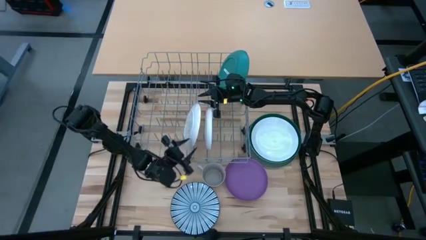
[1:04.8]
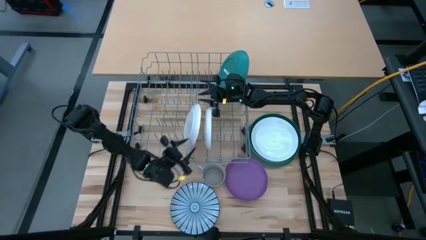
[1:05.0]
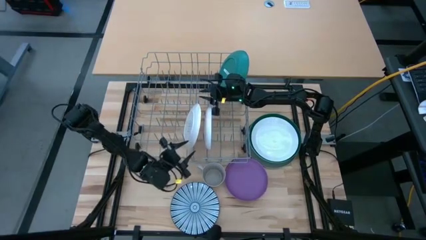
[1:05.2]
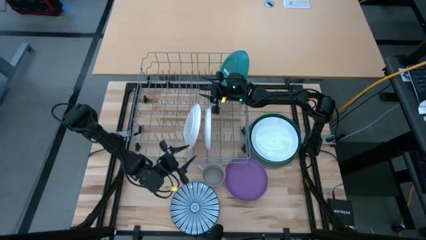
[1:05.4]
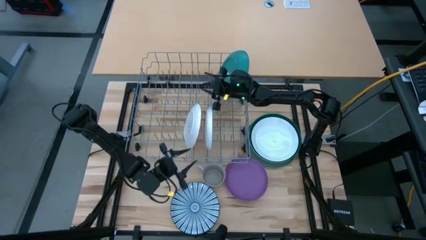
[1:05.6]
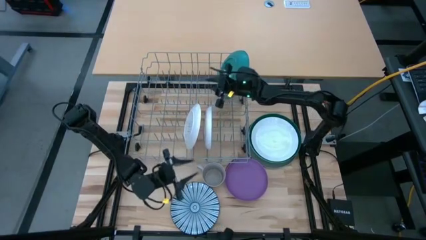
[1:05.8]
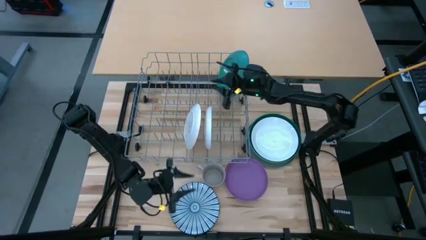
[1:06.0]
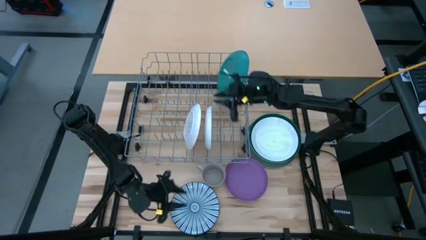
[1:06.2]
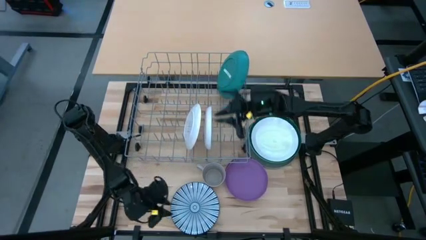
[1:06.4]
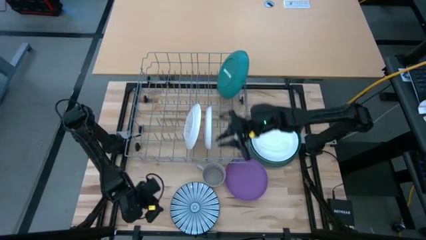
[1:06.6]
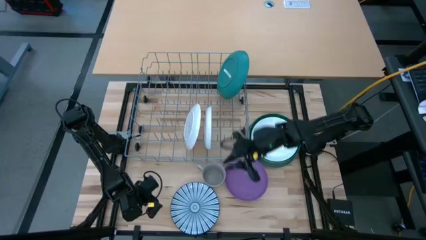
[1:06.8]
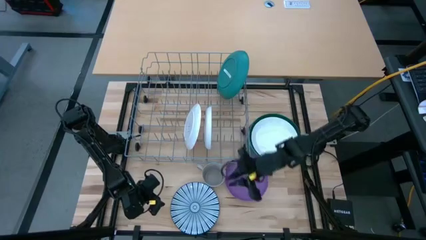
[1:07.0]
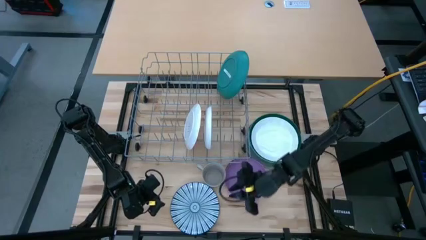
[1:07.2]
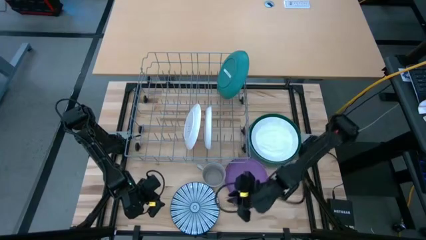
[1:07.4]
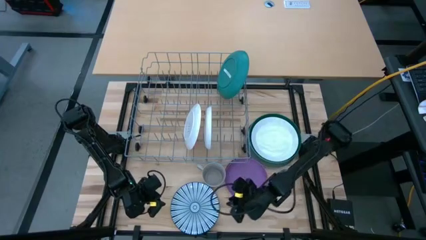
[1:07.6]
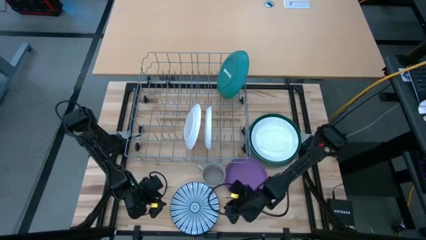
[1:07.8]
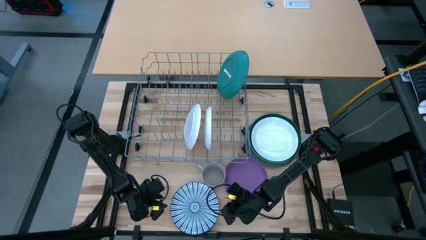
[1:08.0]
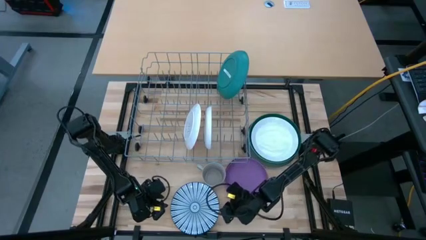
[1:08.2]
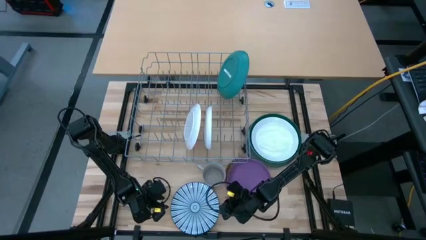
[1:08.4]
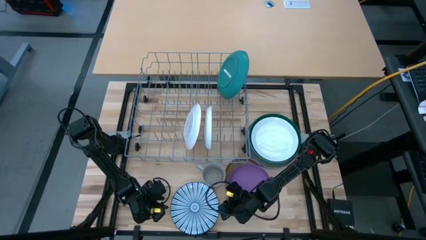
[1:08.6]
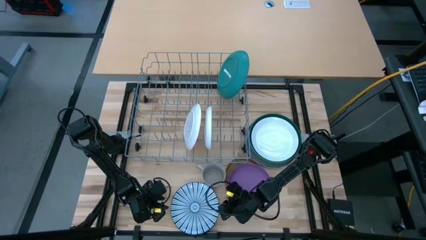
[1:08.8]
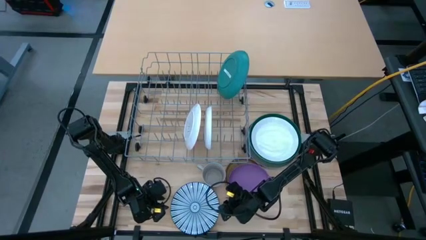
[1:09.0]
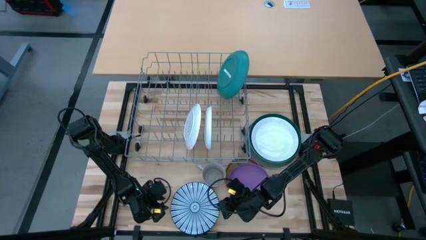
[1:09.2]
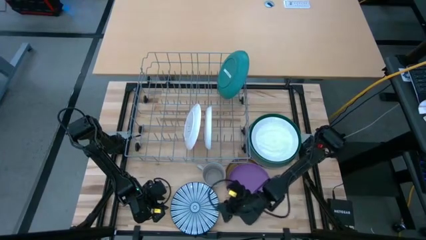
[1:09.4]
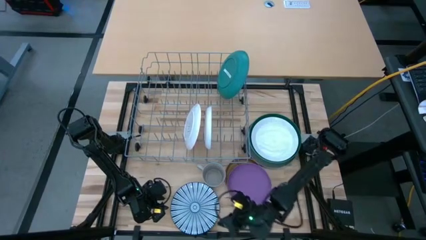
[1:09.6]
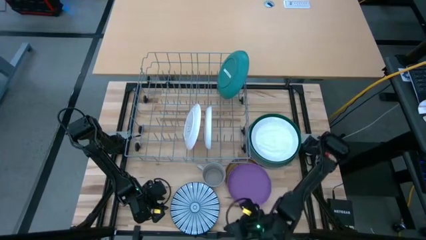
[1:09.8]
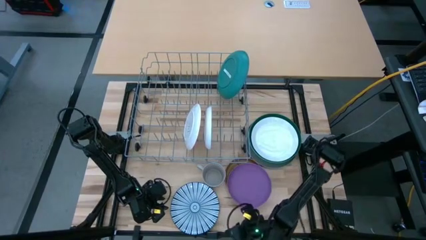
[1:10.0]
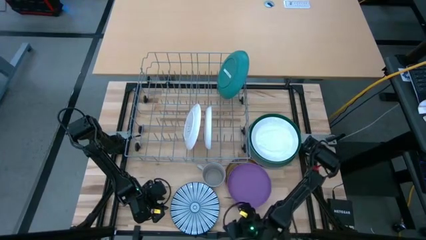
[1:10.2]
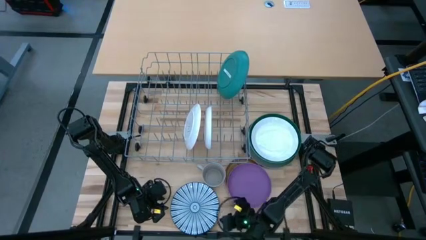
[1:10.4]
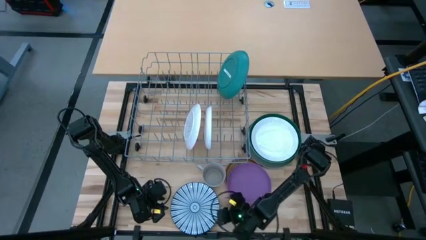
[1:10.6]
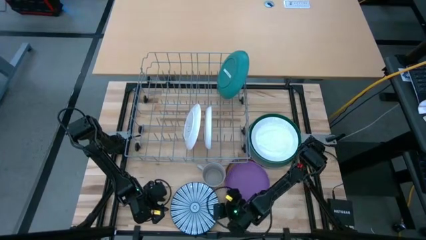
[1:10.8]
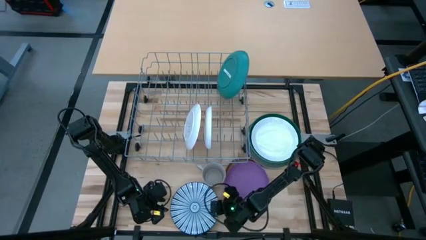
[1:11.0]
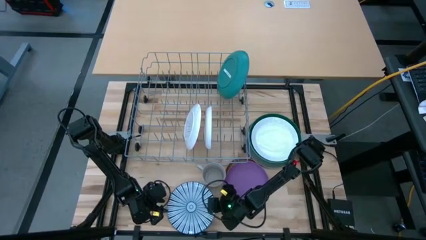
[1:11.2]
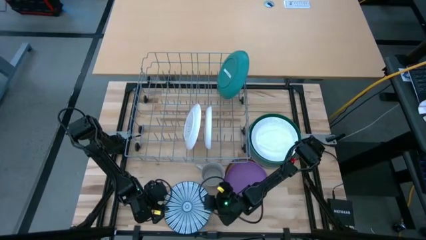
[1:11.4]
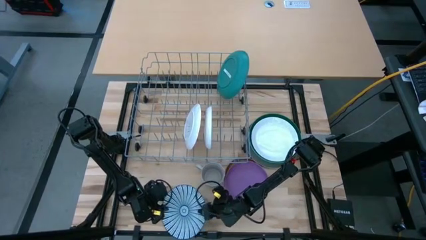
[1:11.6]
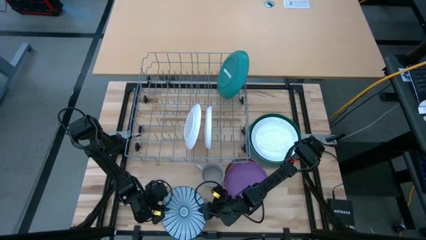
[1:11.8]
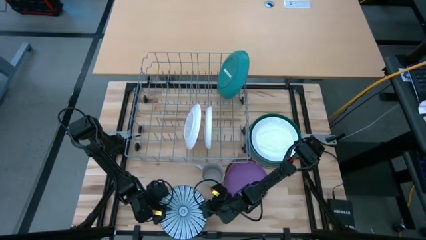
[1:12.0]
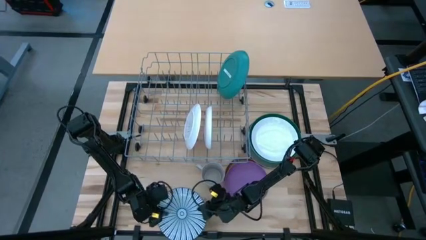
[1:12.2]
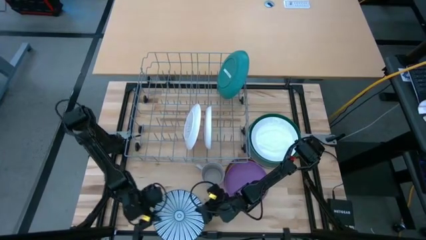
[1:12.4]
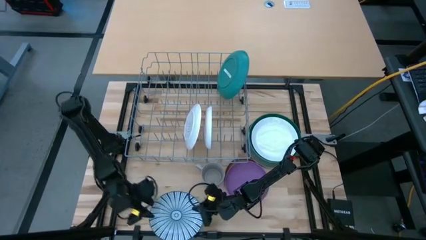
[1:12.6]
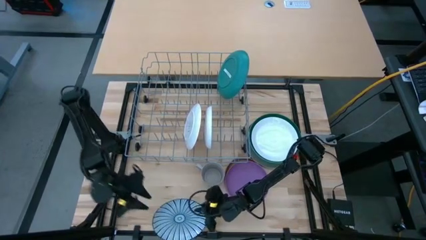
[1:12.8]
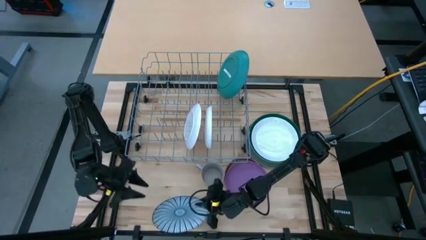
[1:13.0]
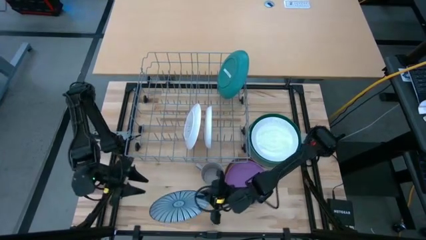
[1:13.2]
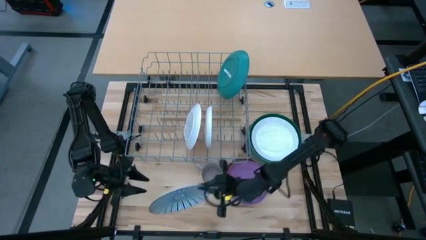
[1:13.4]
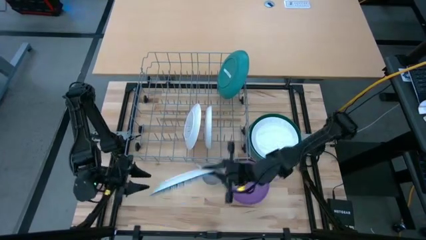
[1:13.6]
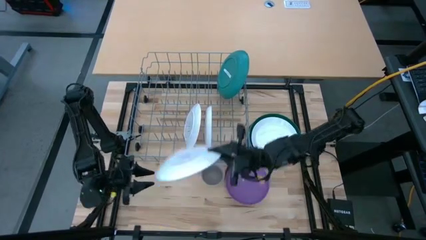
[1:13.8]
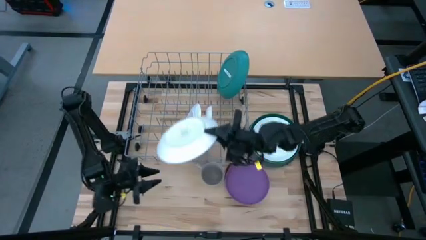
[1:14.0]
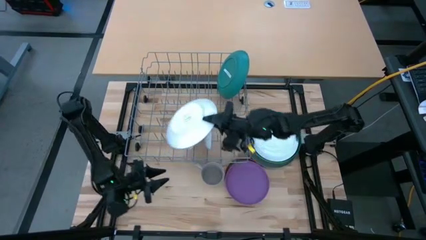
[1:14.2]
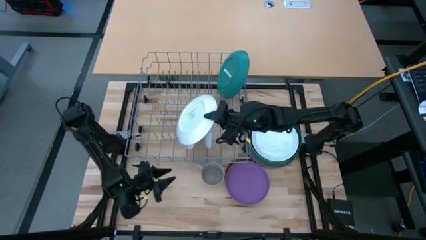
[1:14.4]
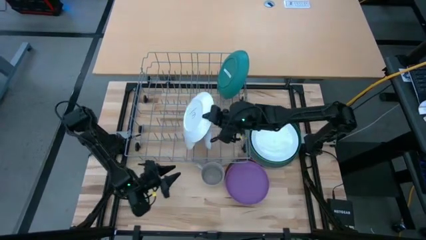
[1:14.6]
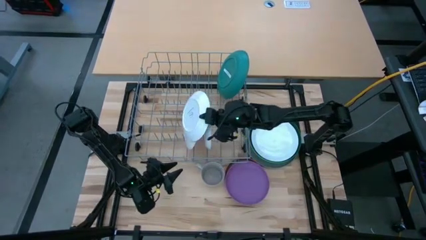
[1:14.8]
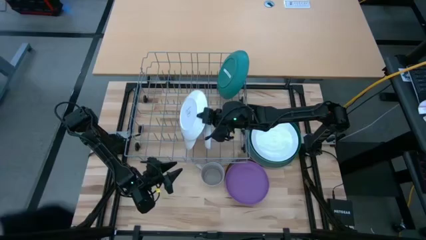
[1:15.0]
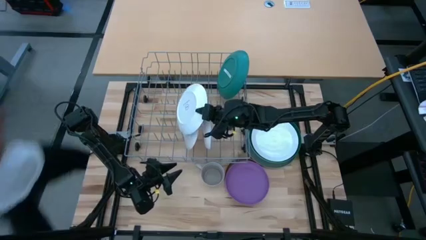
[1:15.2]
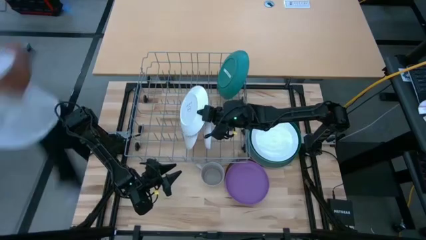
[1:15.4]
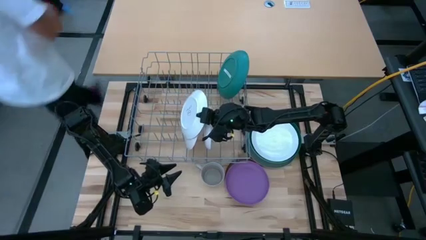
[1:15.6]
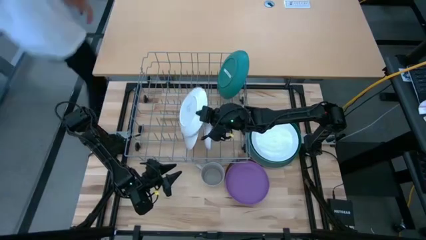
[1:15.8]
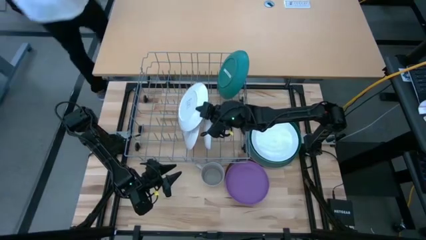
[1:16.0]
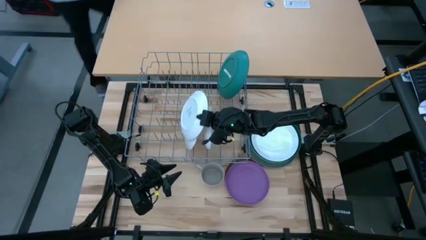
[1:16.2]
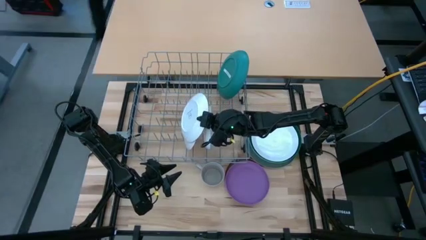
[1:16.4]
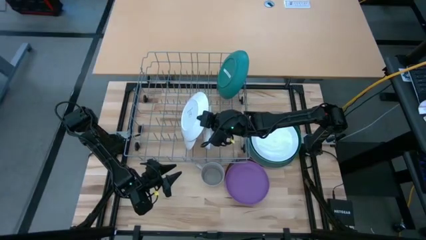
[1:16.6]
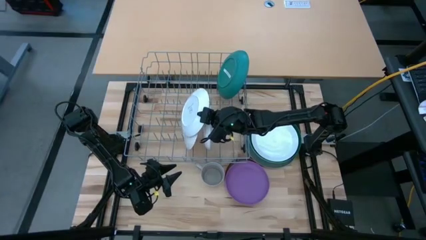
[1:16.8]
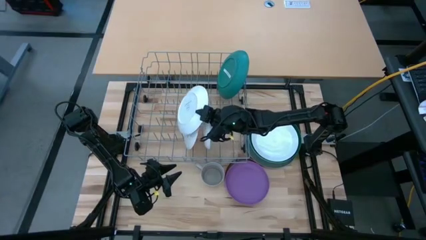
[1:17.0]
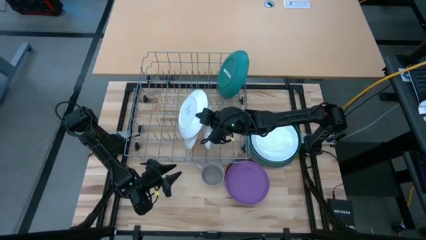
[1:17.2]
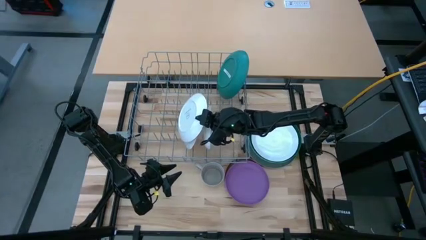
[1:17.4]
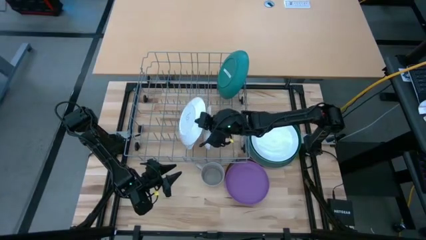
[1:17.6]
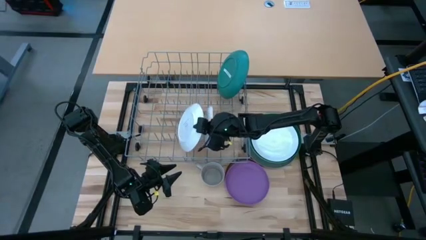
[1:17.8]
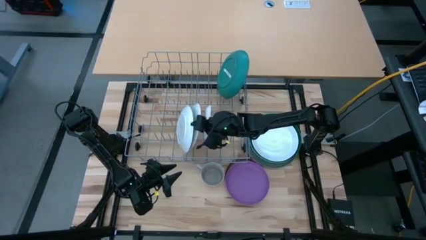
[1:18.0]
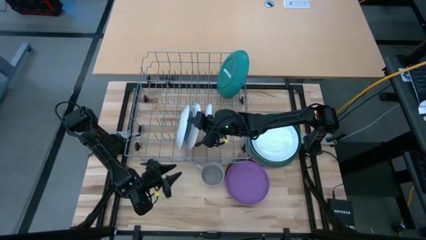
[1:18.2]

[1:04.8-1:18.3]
Task: Sort dishes
Put the blue patterned plate in the dish rack
